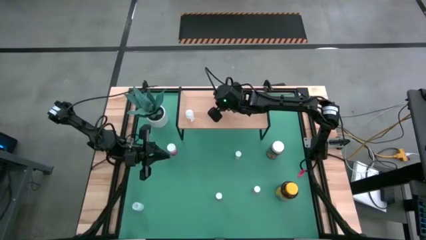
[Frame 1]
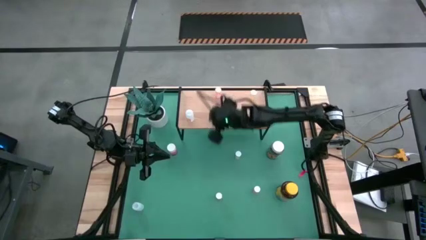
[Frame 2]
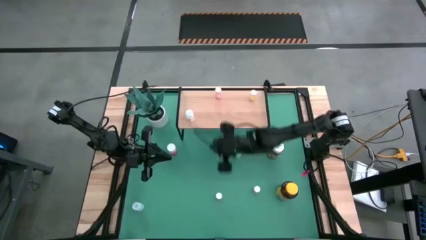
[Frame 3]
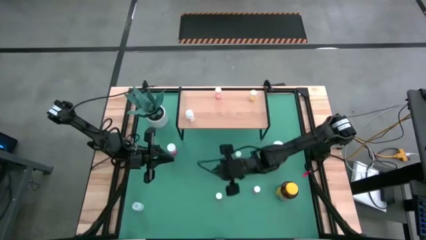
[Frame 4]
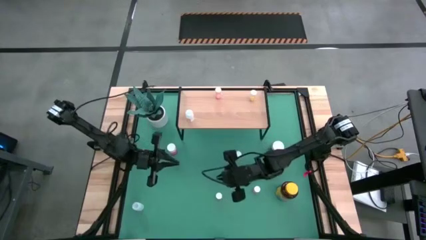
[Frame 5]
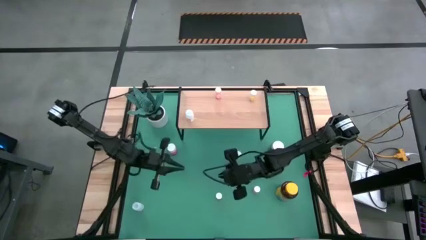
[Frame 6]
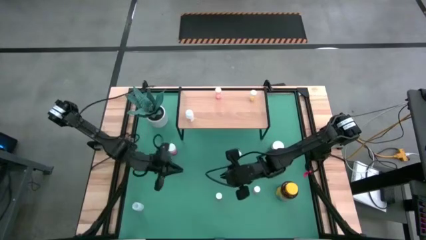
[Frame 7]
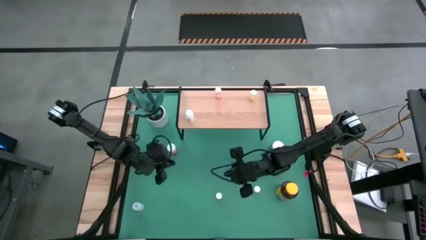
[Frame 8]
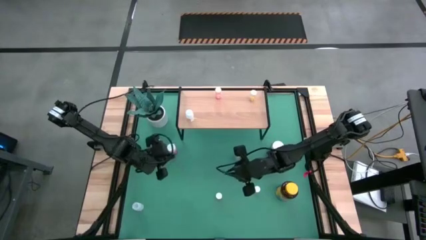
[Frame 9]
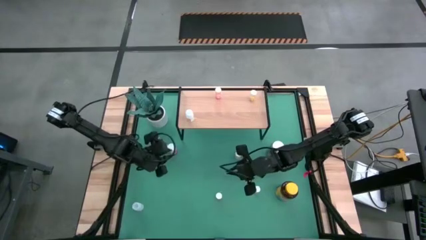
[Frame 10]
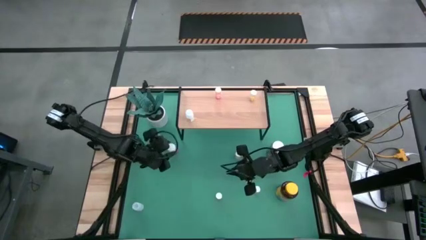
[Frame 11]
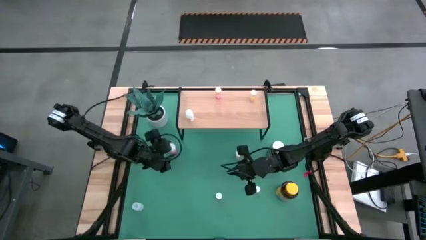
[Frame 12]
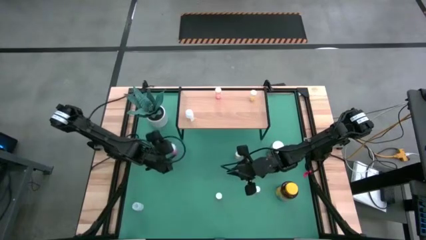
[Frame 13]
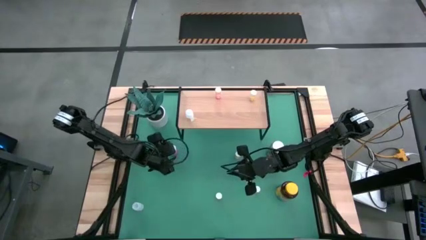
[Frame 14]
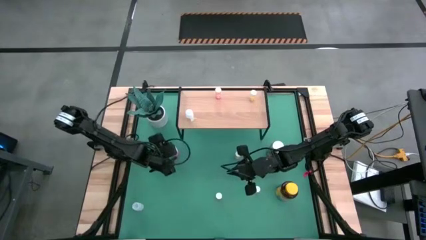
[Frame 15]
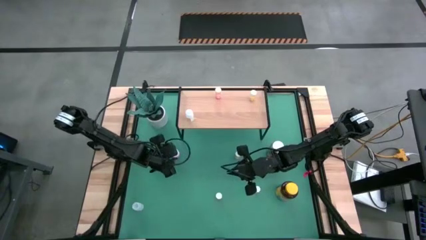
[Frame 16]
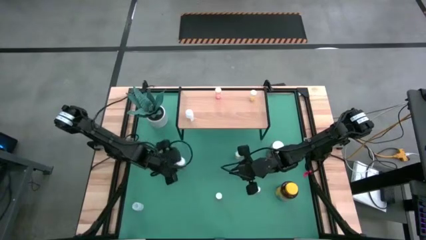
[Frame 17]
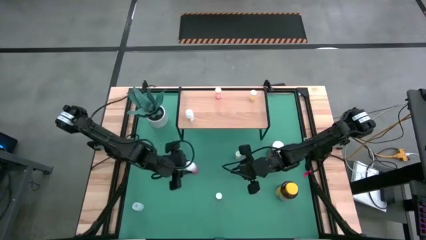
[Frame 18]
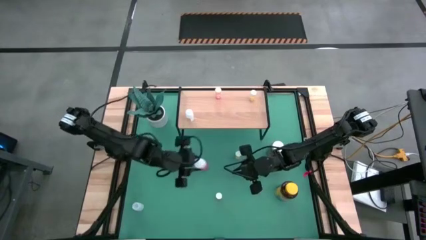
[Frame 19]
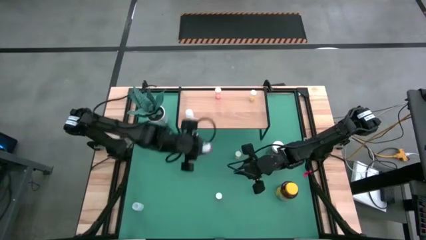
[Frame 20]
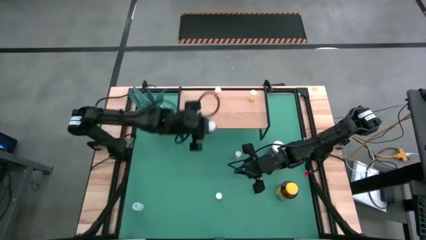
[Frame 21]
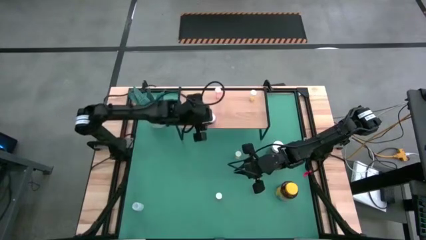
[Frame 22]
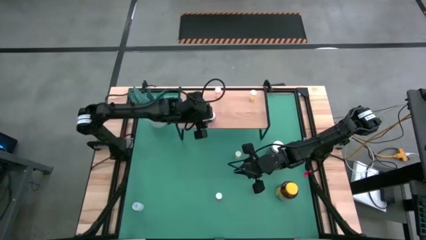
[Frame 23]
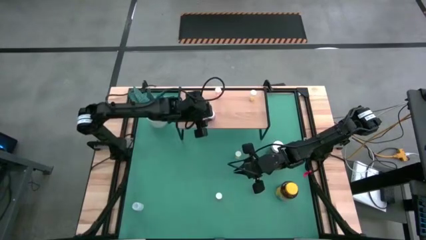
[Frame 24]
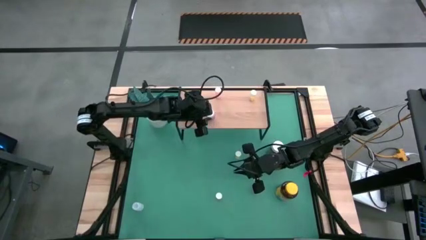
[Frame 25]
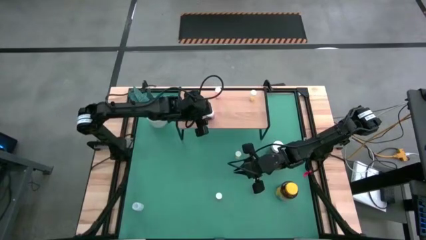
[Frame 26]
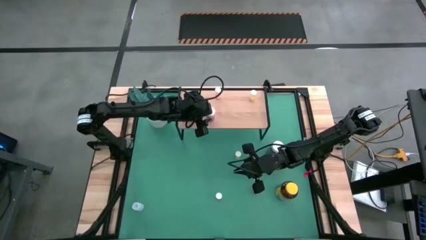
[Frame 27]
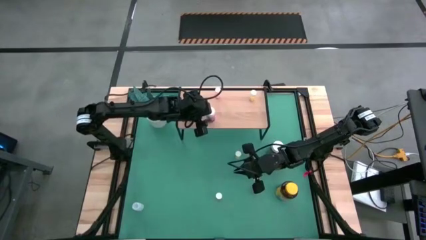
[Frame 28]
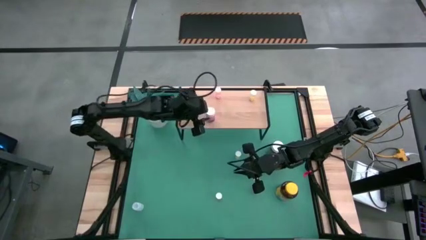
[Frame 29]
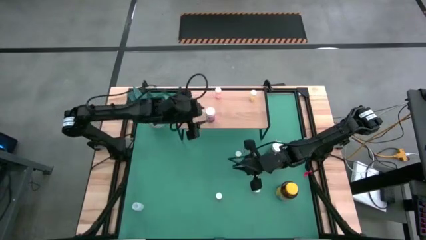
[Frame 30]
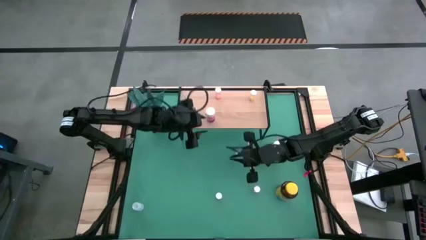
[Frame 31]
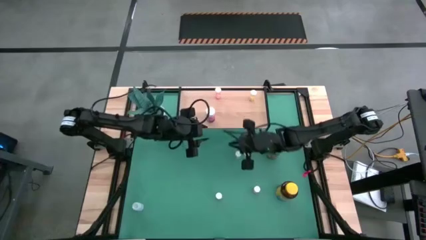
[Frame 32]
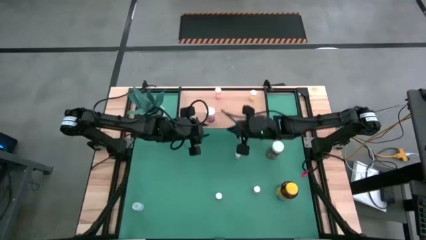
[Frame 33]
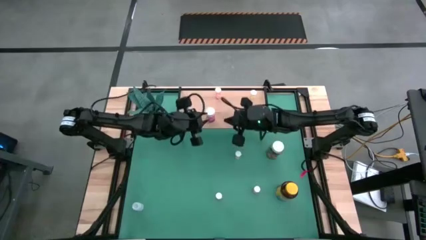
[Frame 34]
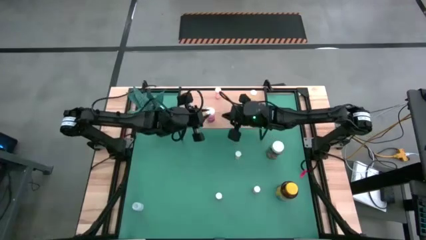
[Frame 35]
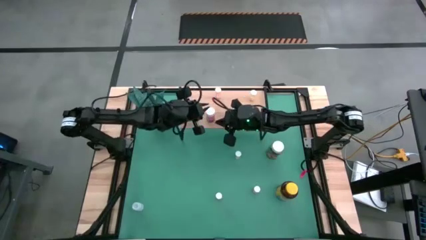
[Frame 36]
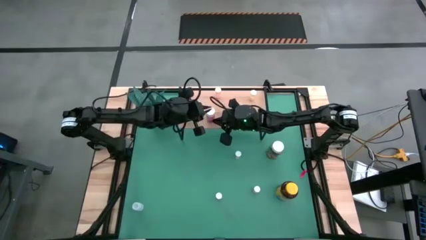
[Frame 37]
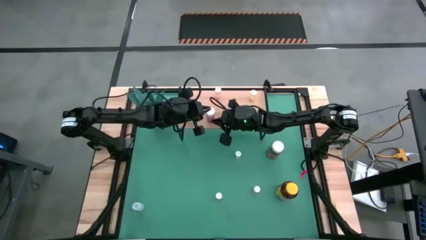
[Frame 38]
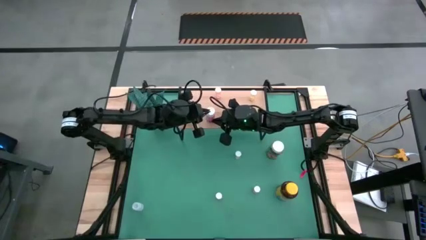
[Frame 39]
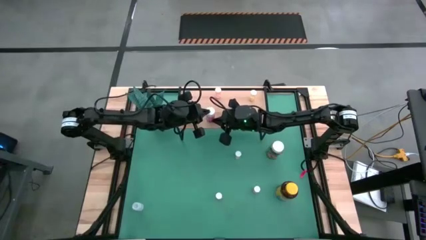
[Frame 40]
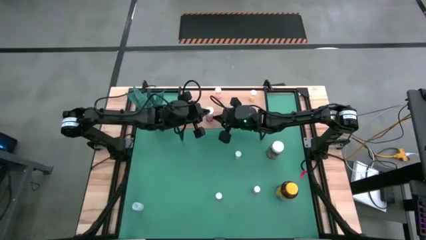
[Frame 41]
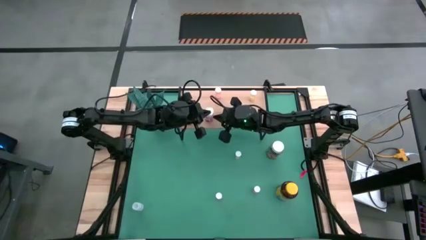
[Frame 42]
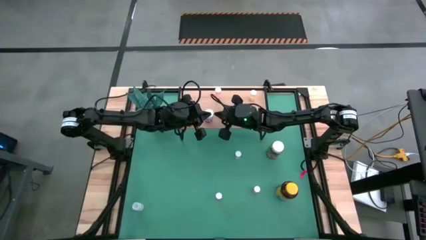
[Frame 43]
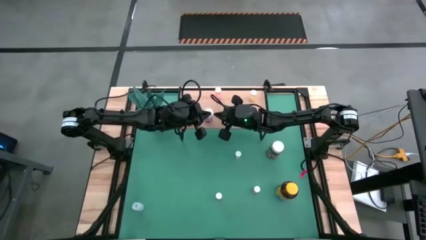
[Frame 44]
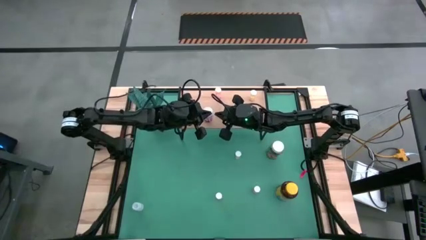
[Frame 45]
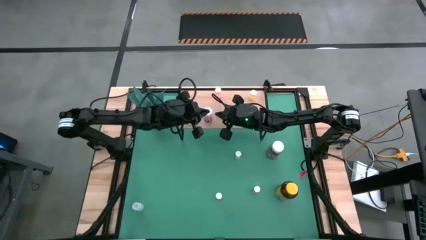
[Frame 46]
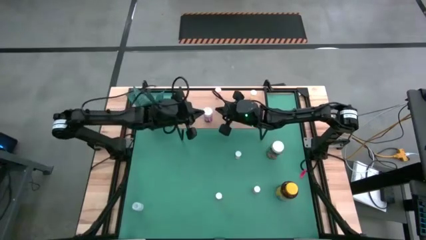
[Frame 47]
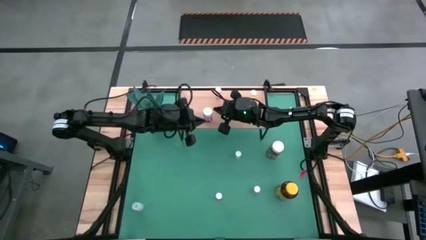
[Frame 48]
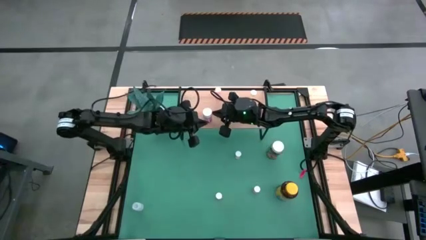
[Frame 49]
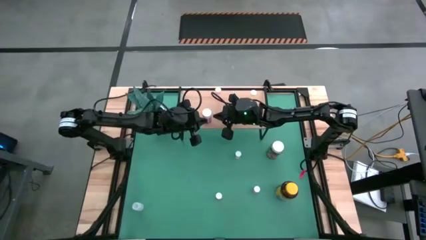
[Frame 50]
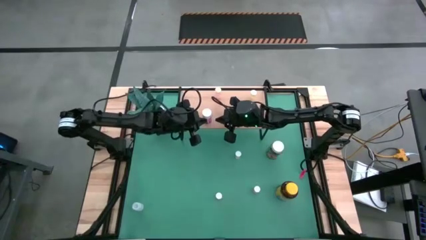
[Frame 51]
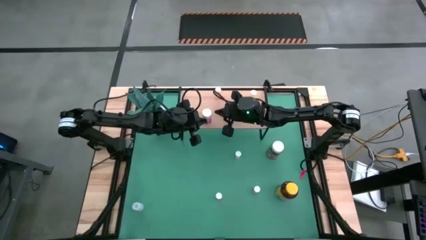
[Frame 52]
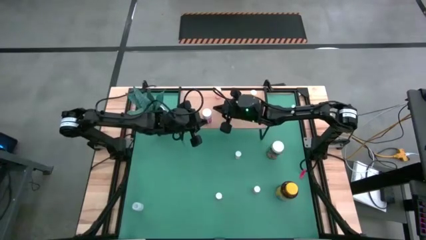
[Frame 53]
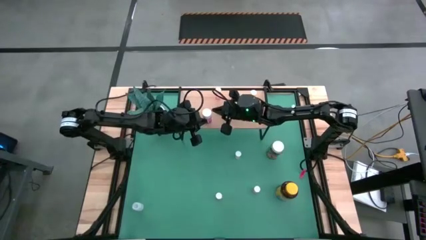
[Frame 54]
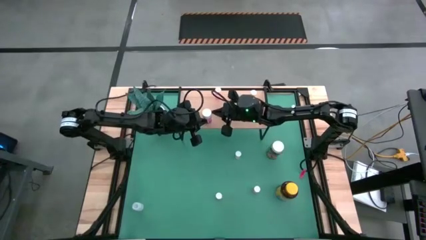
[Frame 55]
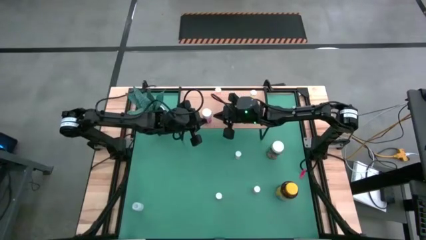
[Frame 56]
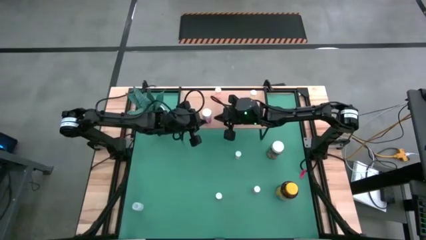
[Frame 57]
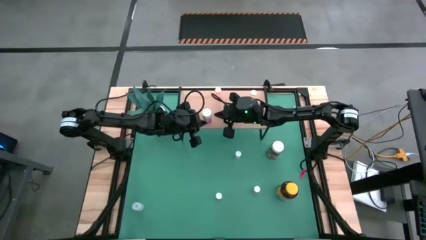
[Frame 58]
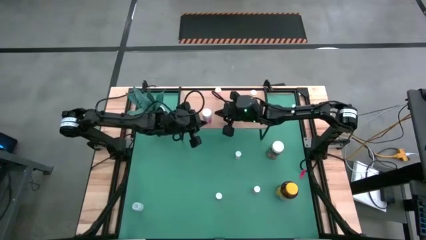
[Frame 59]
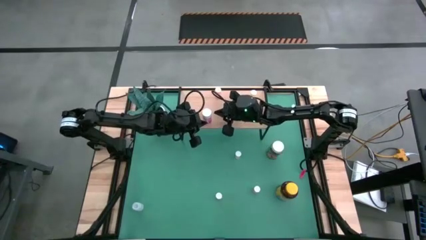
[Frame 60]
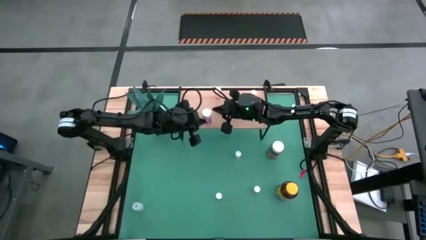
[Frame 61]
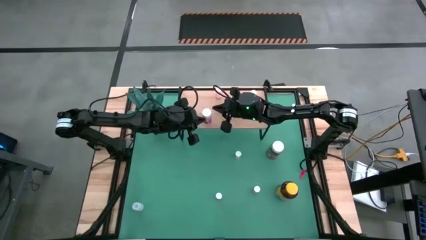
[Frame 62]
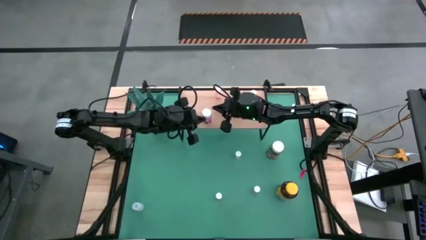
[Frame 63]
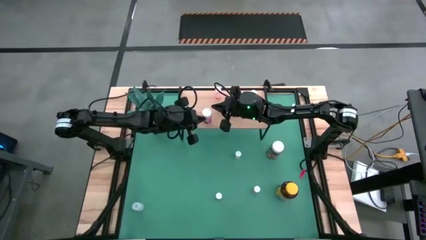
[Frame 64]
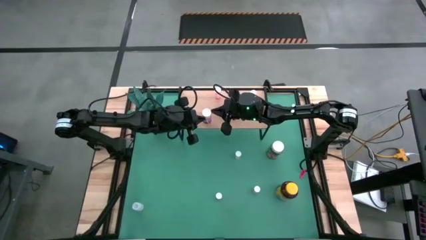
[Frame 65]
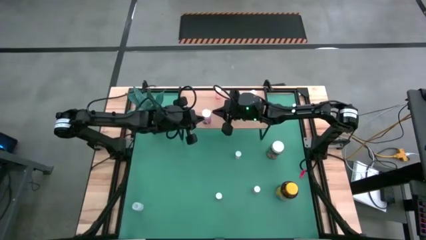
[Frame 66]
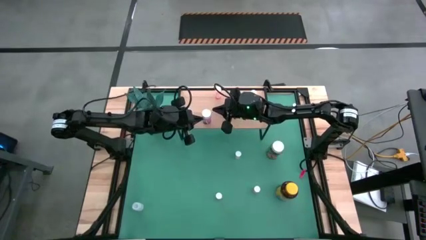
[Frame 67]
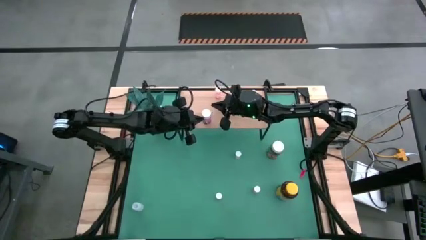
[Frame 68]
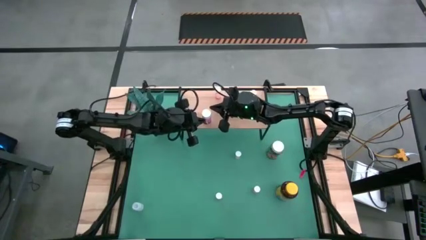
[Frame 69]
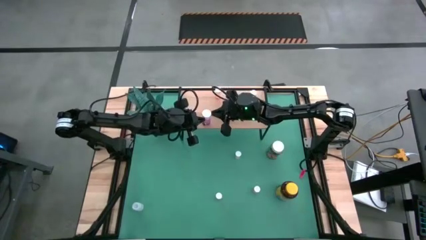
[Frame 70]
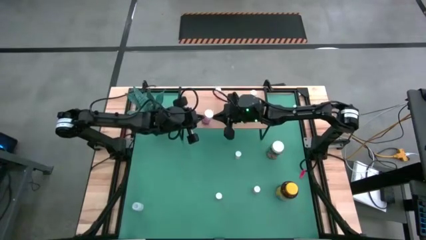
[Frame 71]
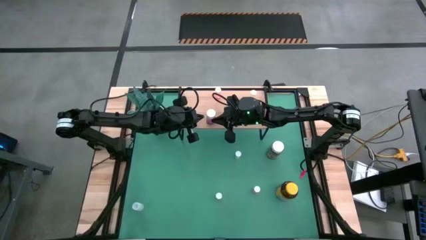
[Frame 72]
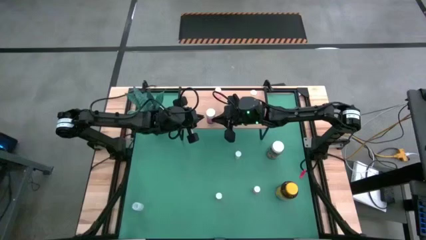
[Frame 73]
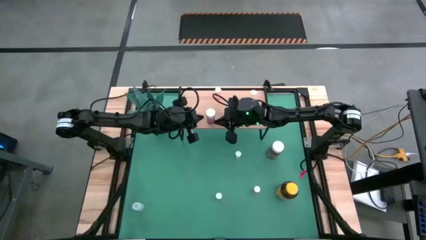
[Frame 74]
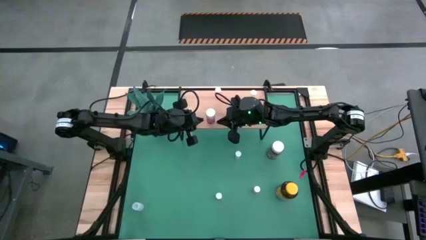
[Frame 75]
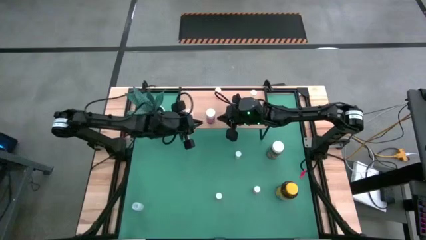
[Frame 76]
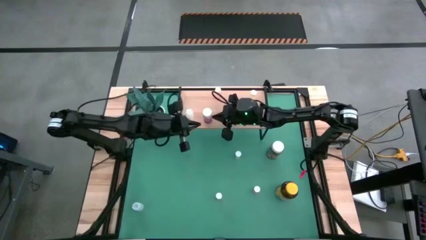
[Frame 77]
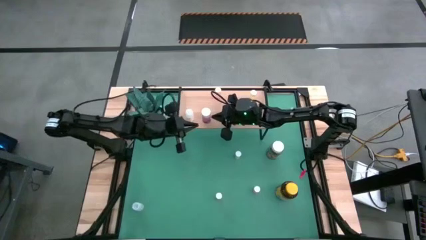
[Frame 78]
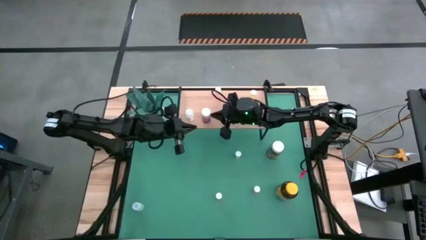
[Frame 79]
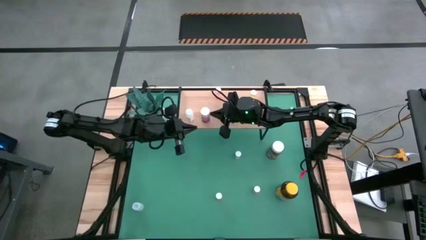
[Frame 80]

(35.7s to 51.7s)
Task: Pick and place medicine bottles onto shelf by color
Put the pink and blue pill bottle on the shelf
